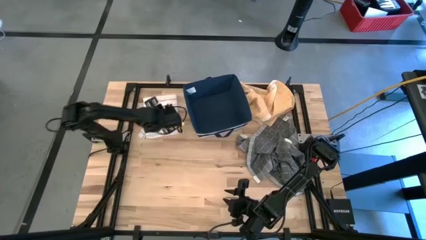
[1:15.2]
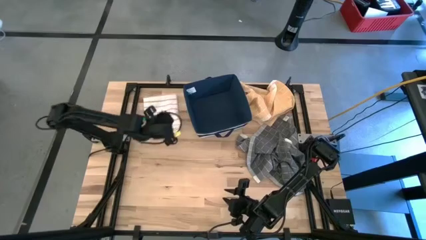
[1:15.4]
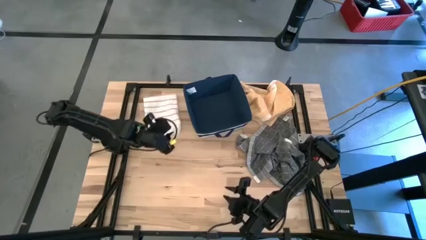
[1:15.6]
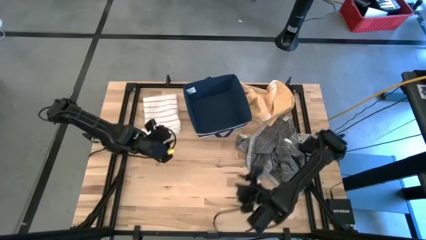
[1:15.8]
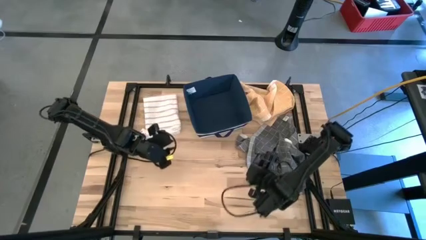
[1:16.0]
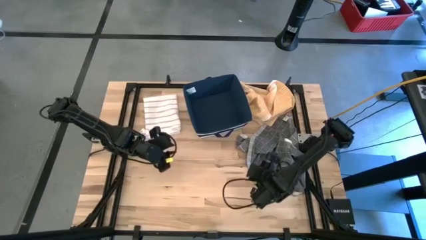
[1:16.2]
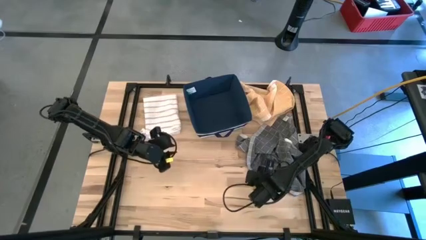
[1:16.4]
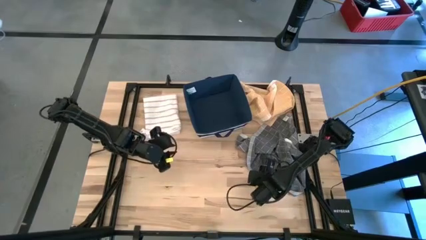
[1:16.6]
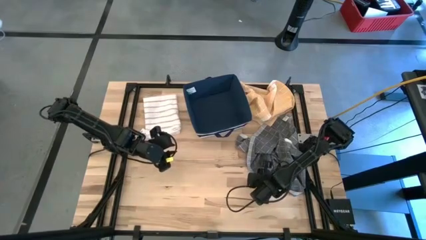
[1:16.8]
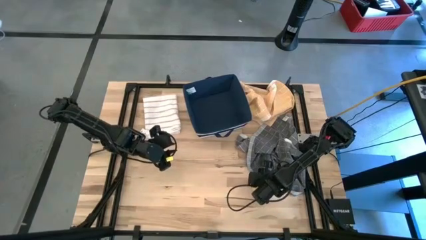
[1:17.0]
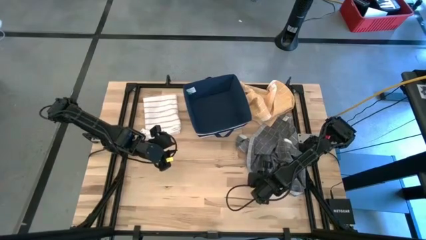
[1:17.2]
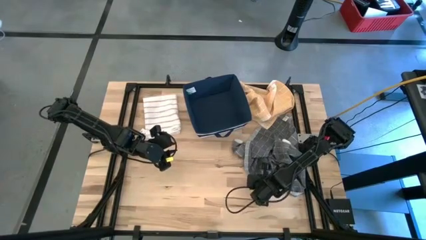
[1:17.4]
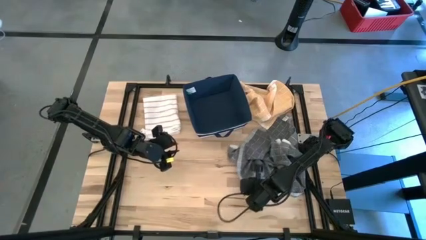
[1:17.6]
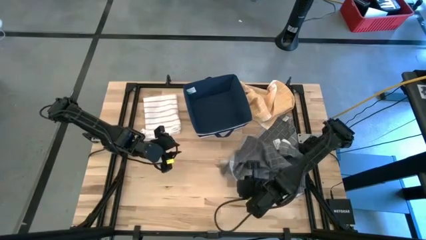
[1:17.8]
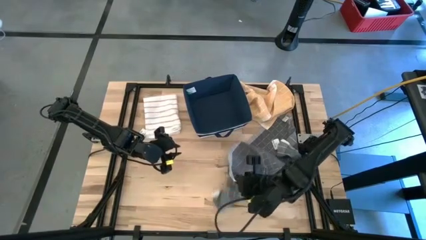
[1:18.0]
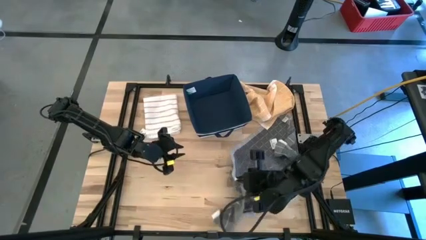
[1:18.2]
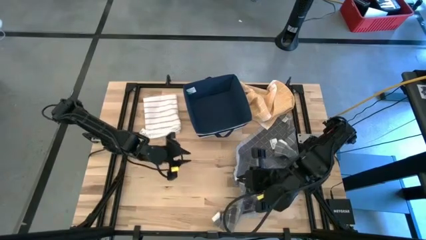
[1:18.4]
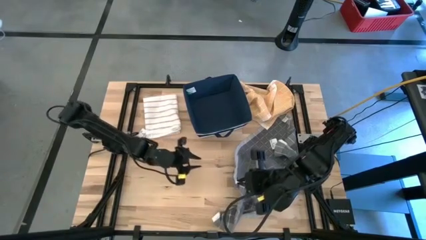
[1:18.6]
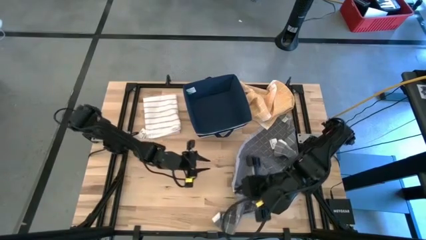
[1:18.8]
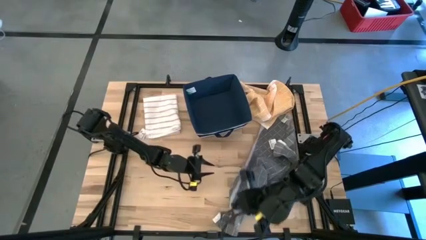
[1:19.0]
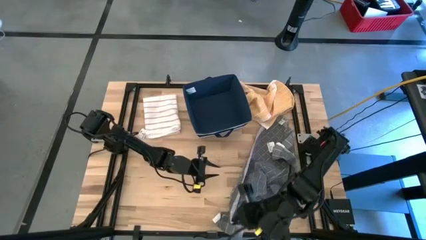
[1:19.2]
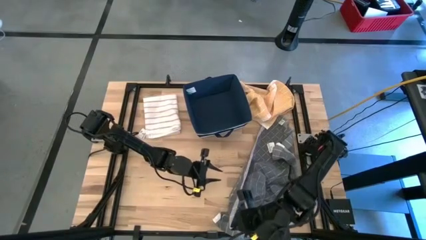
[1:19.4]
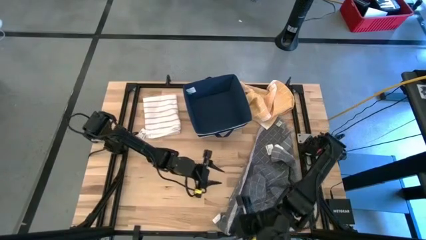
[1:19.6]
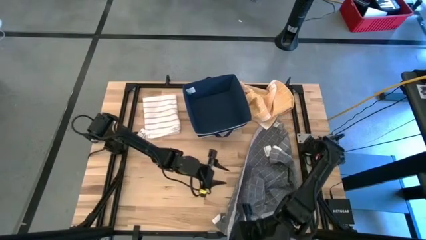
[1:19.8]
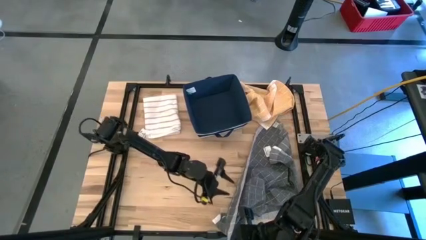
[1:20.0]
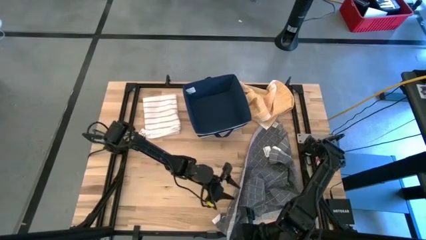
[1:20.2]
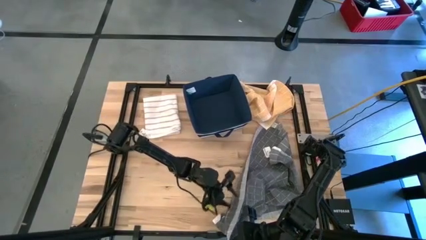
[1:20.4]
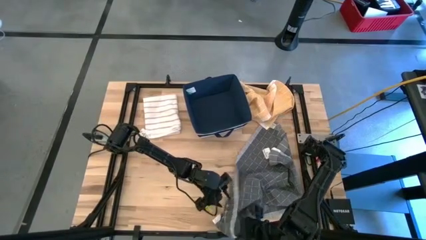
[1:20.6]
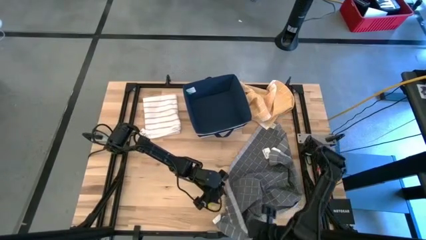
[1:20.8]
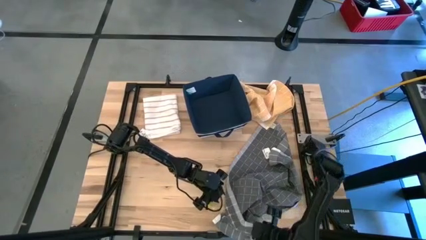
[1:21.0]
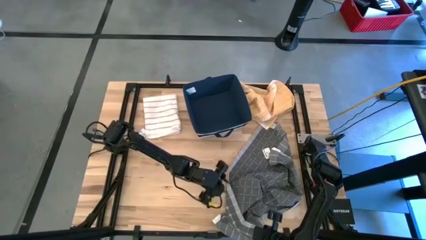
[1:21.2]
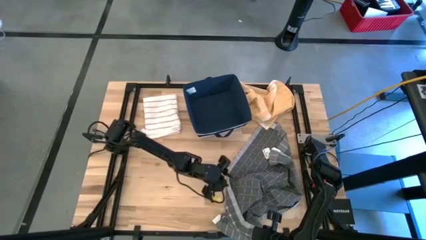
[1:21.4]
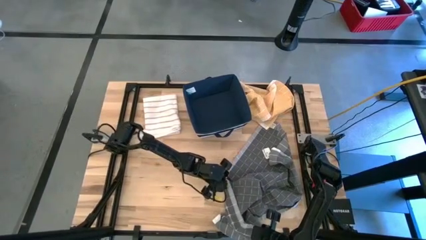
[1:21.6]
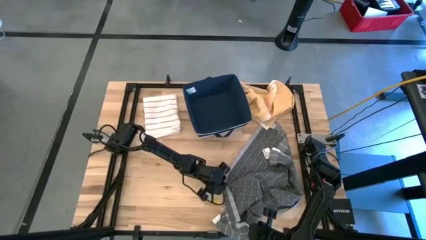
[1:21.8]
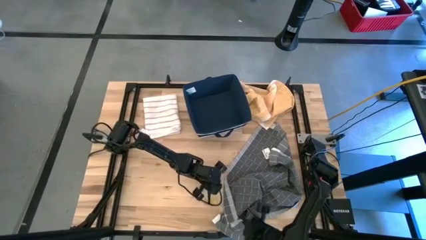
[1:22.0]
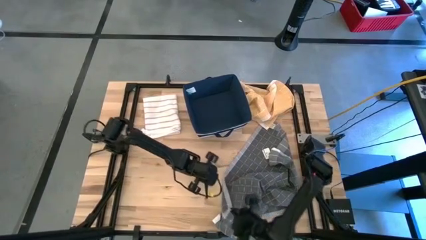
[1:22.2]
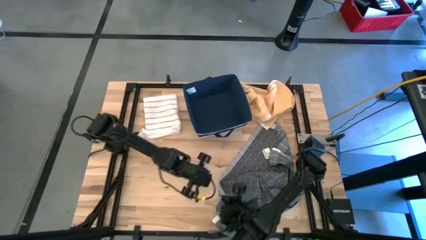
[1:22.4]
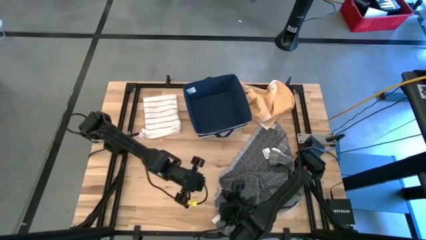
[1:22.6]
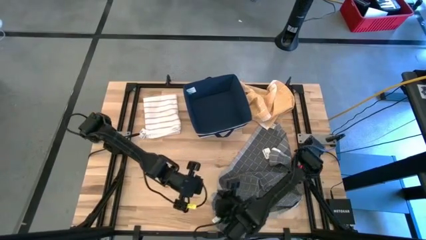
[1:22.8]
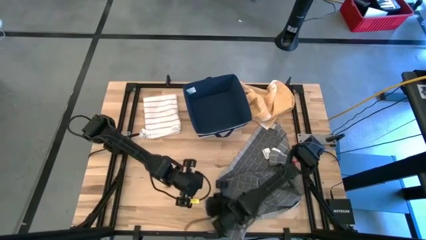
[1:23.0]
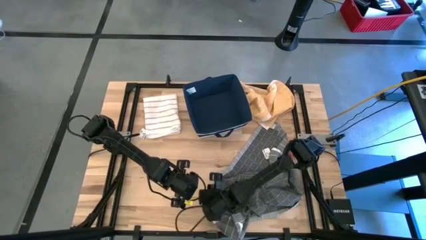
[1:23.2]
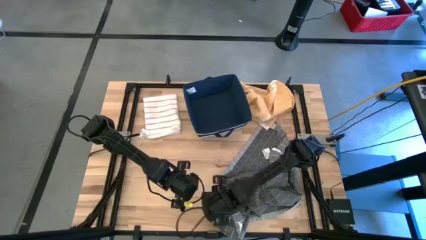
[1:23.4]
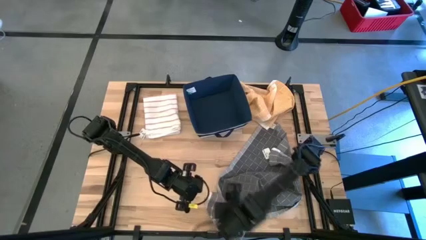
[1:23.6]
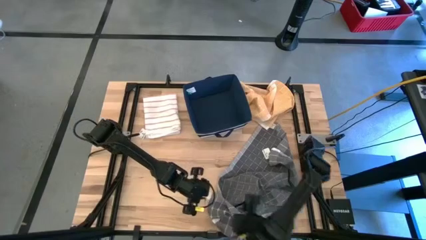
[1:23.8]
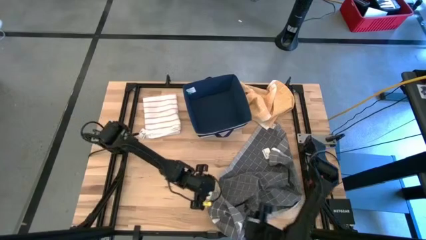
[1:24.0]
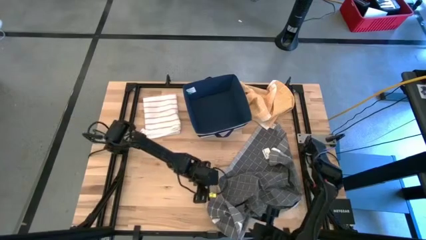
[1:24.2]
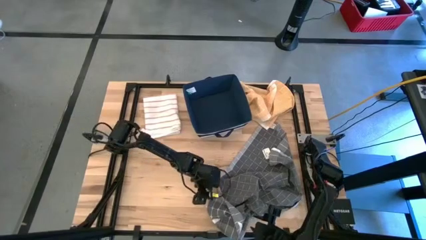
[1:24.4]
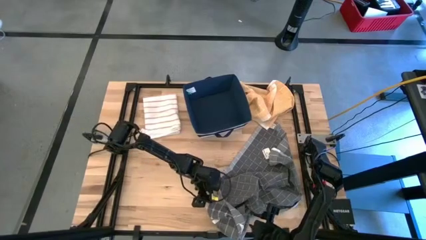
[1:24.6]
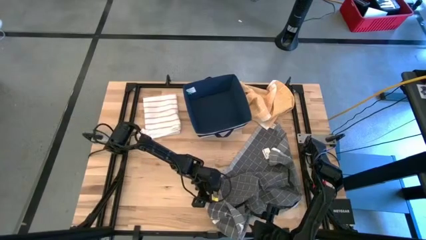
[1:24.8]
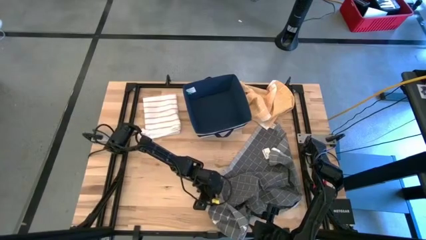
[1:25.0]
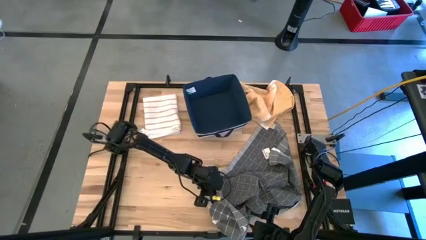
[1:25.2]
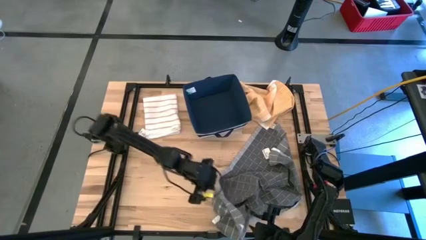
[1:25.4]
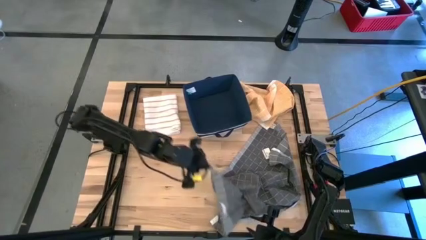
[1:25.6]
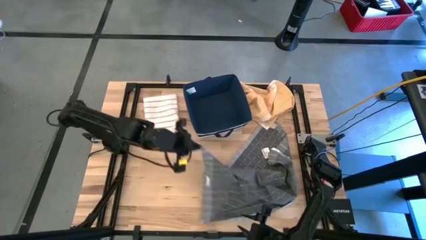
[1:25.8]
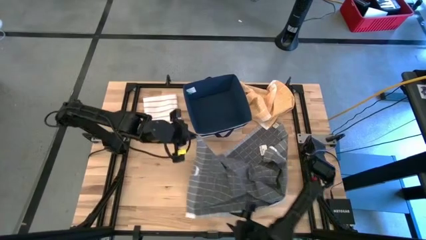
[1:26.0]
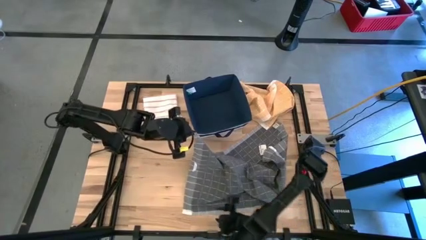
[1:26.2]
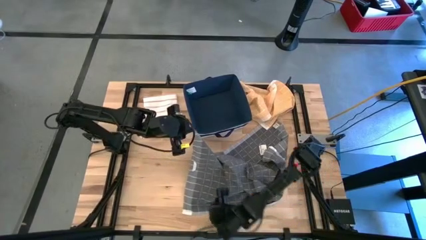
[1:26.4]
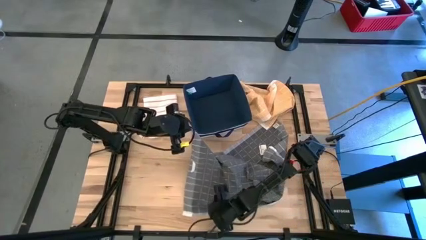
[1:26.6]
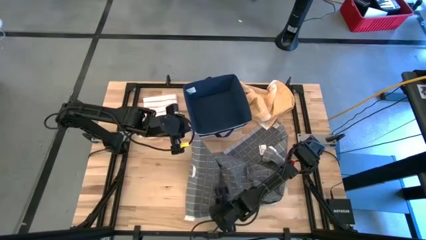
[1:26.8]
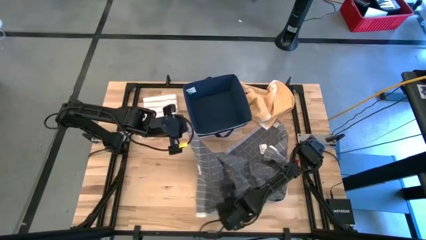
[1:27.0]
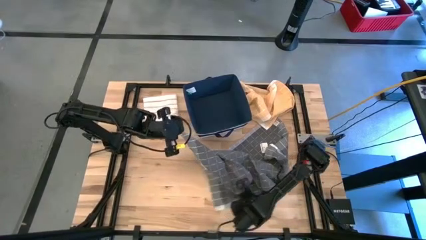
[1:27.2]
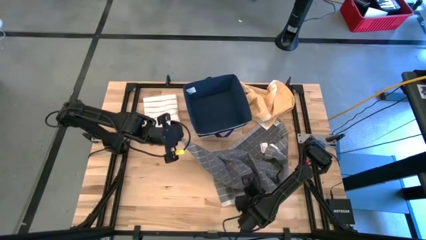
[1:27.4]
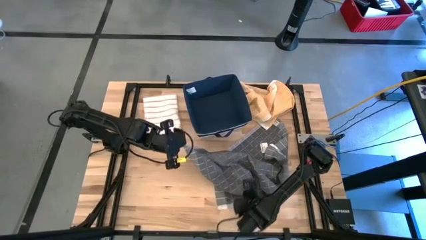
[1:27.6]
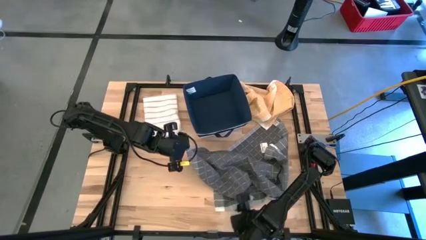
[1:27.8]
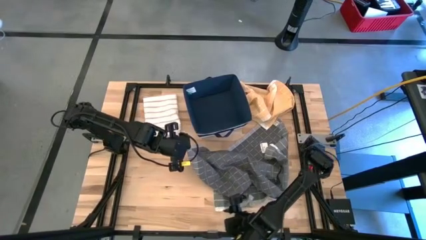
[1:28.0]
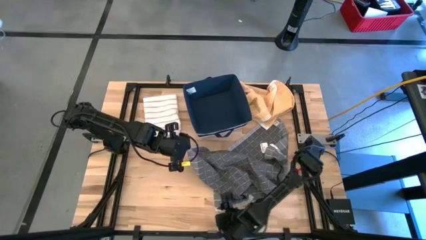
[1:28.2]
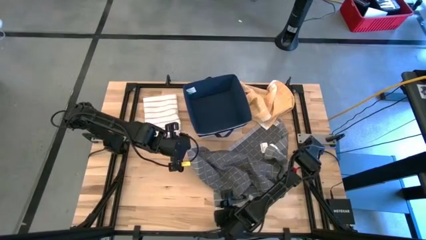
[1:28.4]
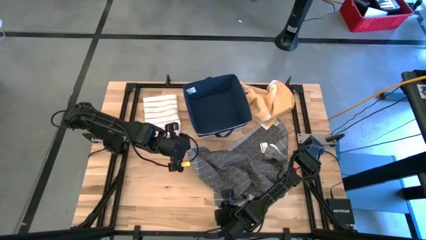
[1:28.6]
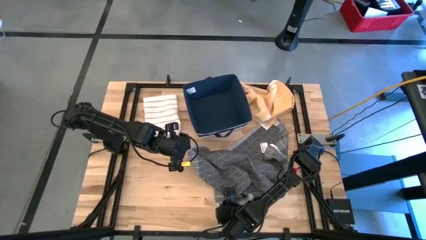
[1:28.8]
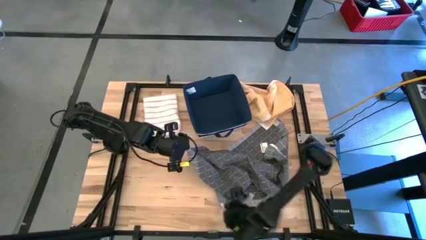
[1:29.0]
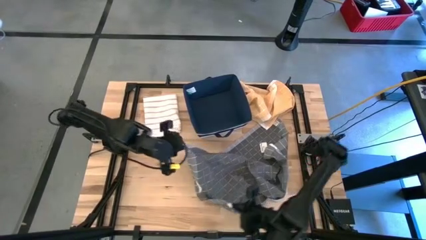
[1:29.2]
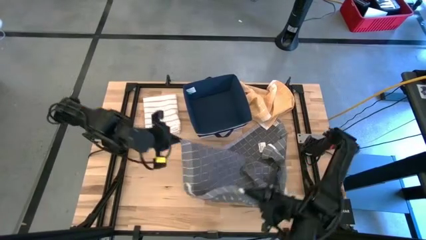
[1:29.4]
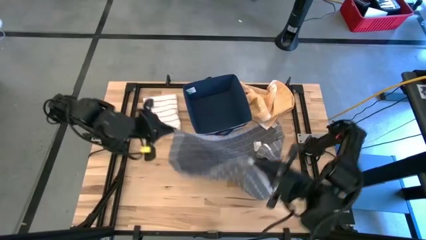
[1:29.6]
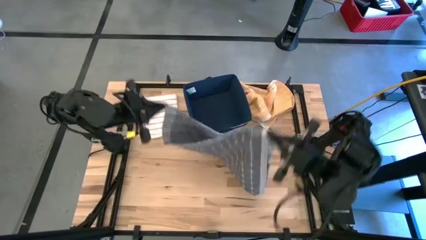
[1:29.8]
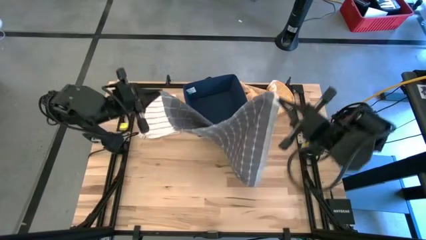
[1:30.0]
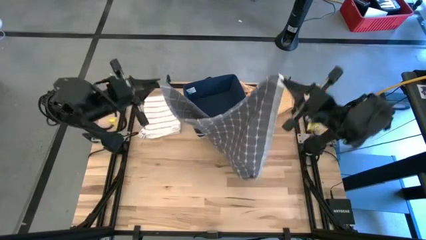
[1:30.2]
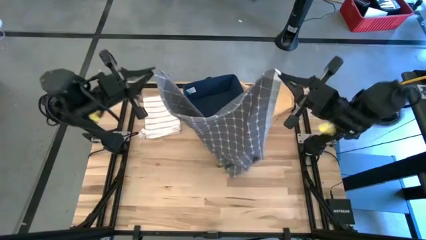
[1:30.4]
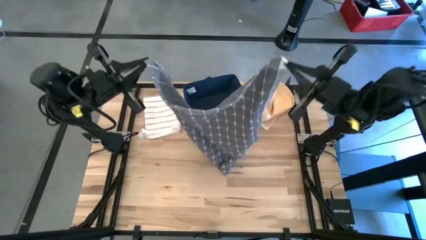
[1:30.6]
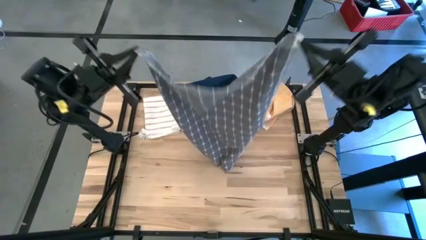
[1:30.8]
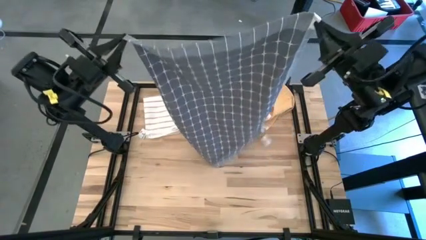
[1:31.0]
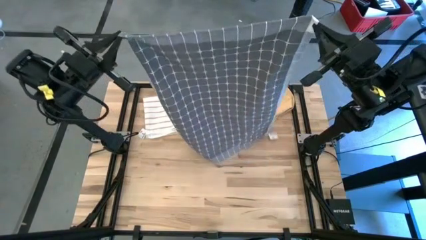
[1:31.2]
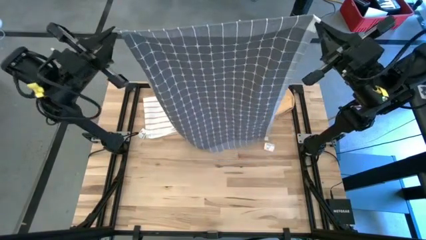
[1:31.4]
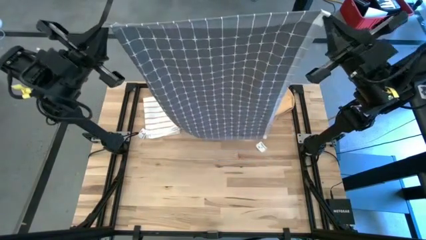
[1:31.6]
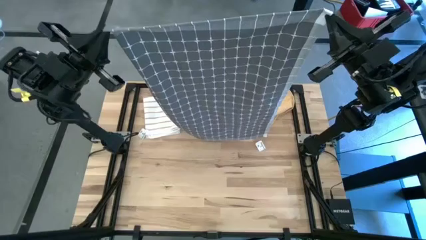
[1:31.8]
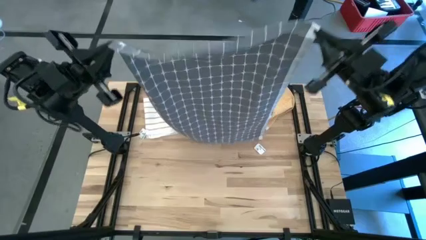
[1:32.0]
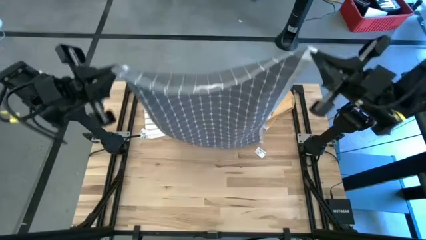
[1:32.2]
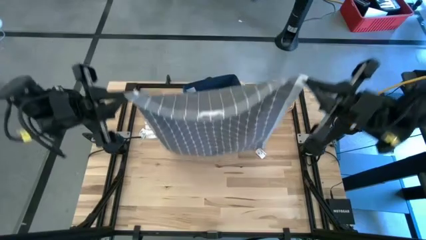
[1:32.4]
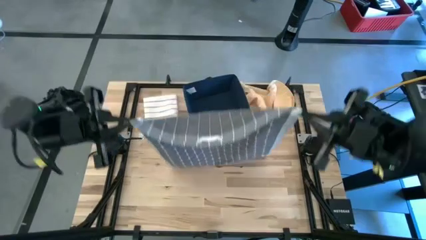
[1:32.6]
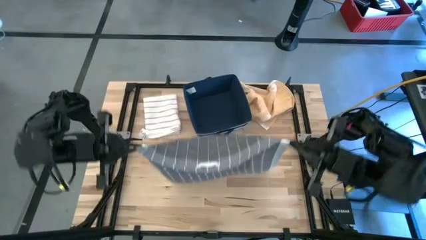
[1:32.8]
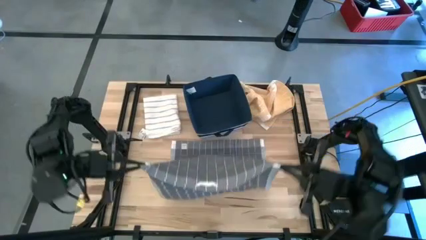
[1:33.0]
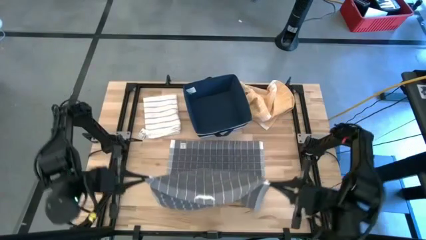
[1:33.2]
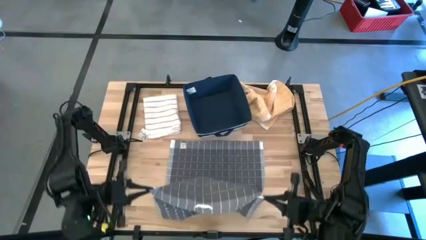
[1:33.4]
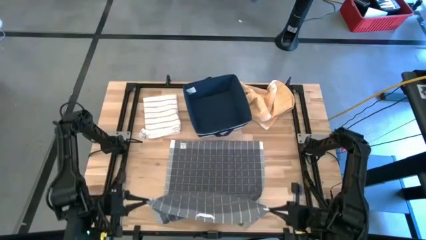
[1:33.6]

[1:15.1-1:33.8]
Task: Fold towel
Fold the black towel
